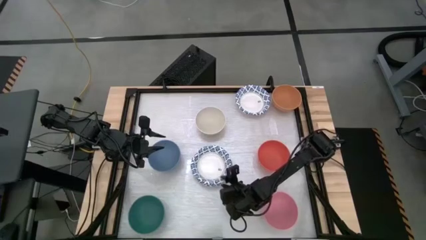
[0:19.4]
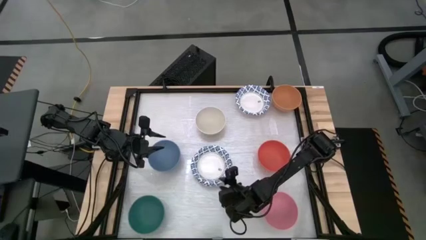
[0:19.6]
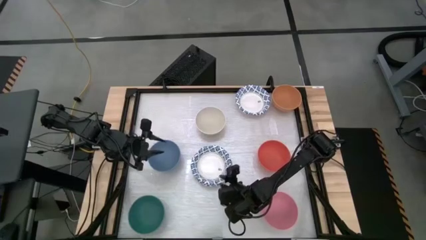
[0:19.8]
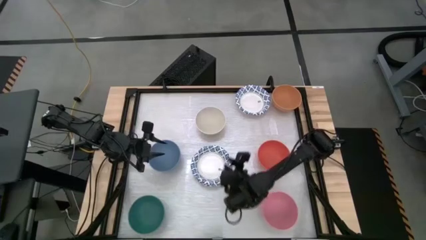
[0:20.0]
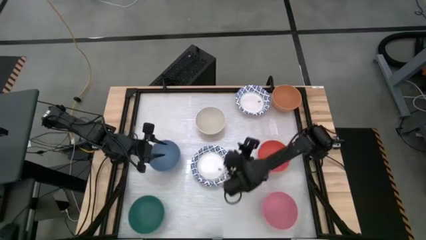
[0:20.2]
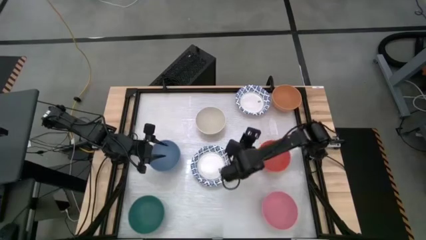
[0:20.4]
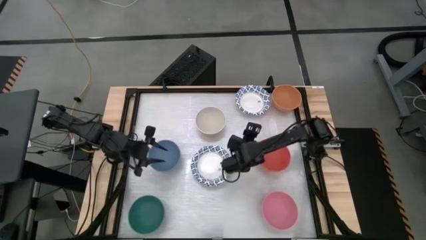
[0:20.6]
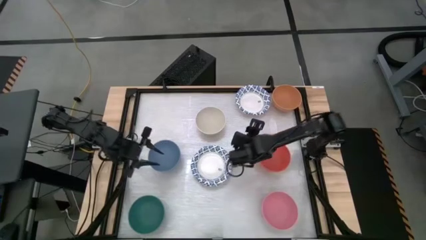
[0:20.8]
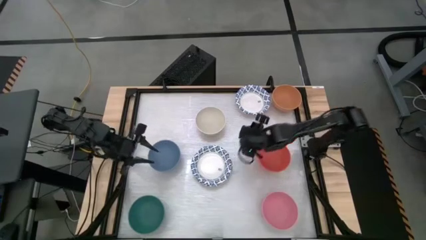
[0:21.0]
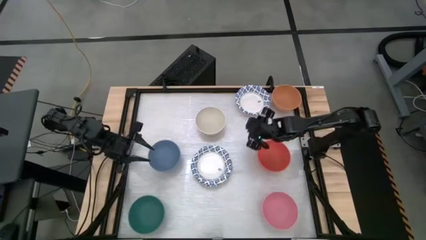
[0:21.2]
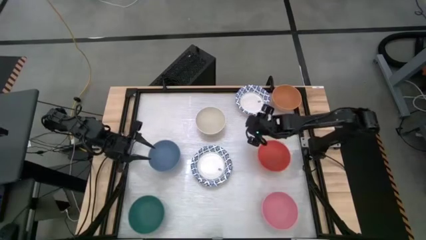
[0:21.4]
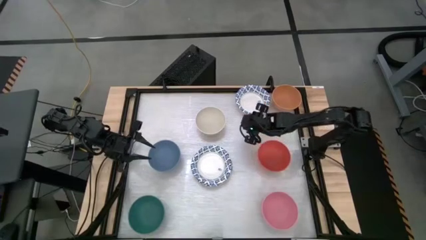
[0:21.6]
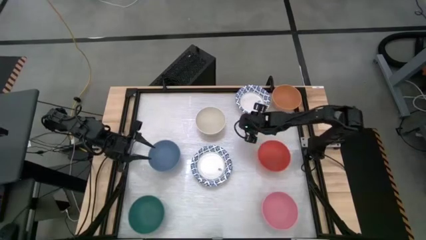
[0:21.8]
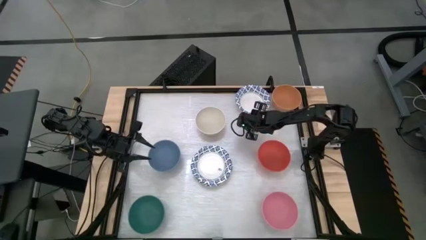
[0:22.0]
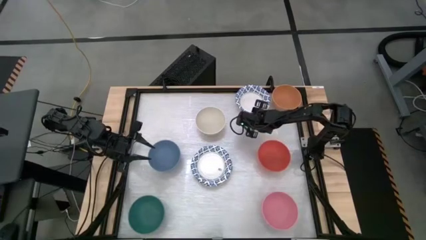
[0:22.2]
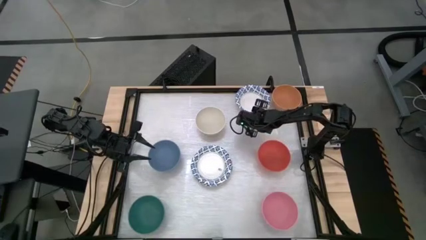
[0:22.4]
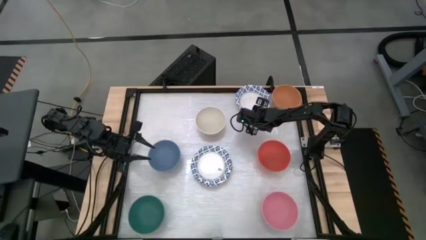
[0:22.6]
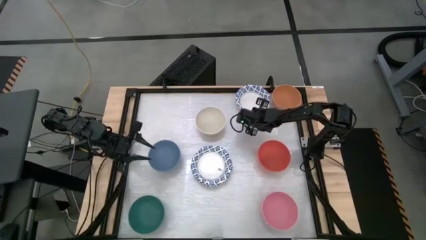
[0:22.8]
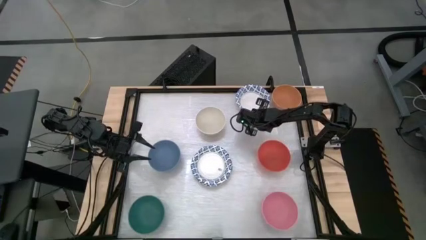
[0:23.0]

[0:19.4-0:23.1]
Task: Nest bowls inside each other by size order
Stack the top white blue bowl into the center white blue bowls

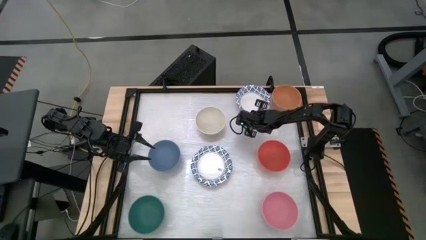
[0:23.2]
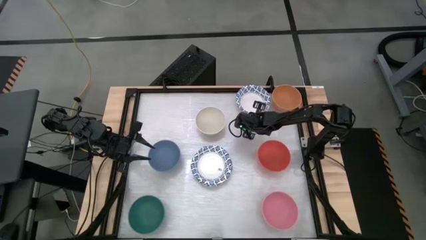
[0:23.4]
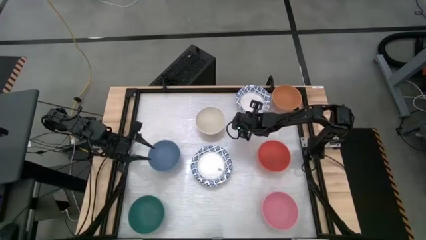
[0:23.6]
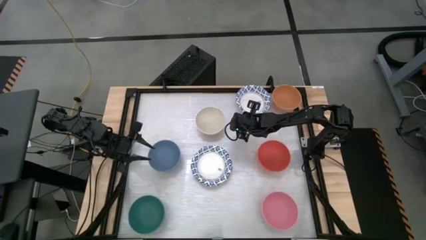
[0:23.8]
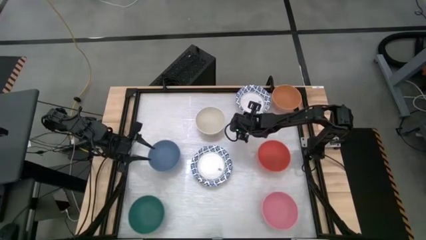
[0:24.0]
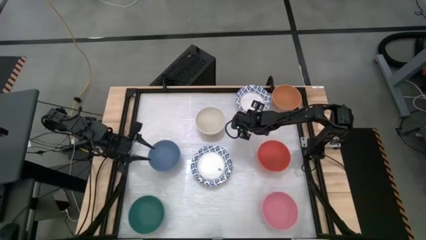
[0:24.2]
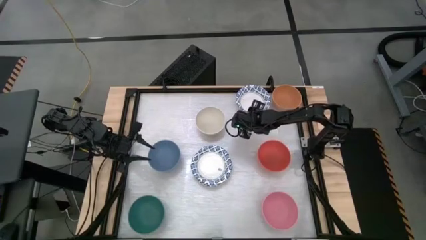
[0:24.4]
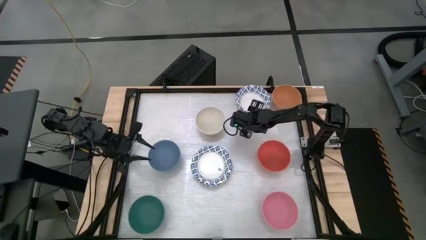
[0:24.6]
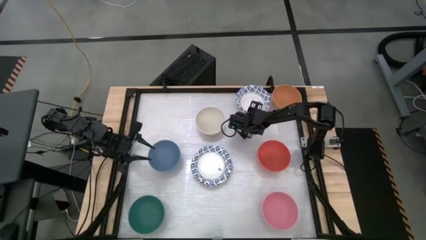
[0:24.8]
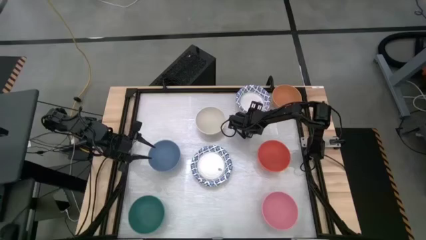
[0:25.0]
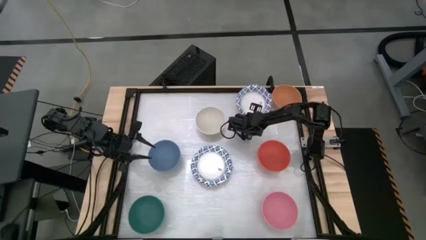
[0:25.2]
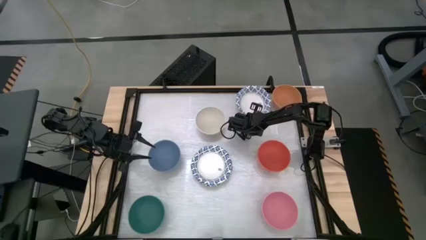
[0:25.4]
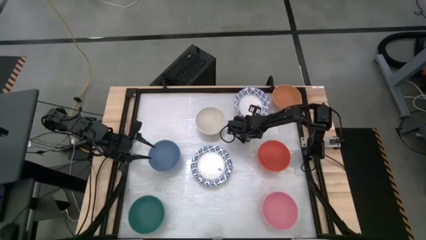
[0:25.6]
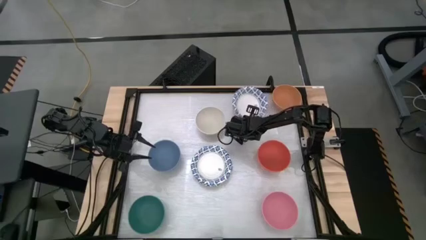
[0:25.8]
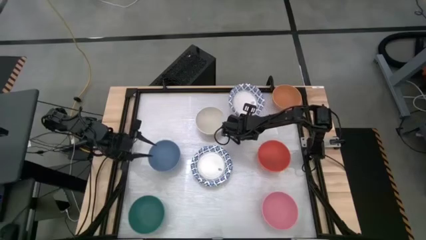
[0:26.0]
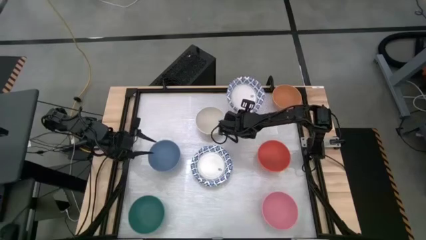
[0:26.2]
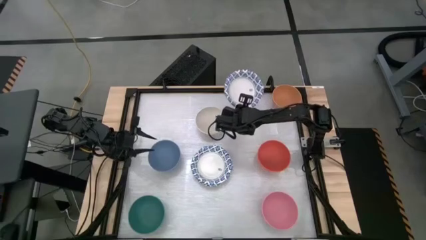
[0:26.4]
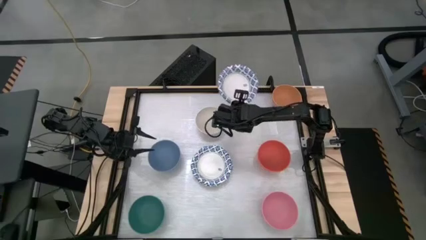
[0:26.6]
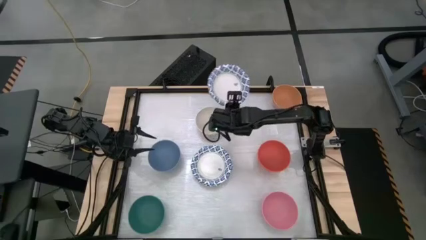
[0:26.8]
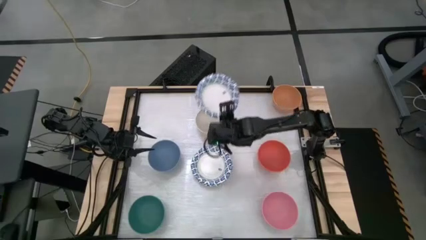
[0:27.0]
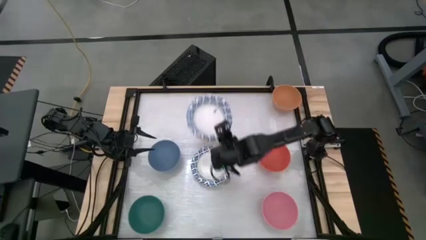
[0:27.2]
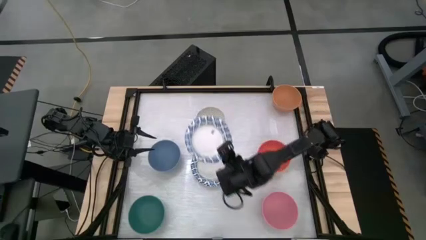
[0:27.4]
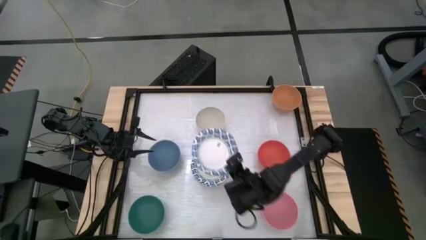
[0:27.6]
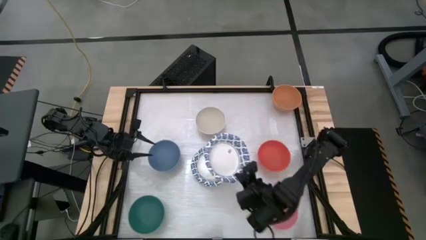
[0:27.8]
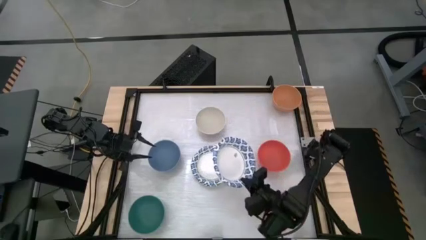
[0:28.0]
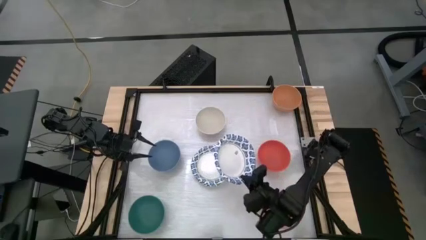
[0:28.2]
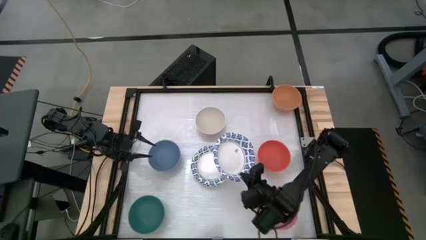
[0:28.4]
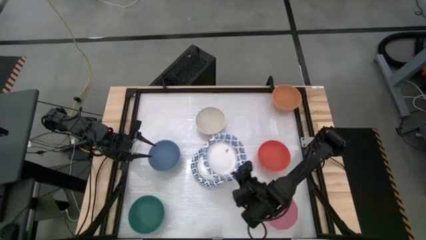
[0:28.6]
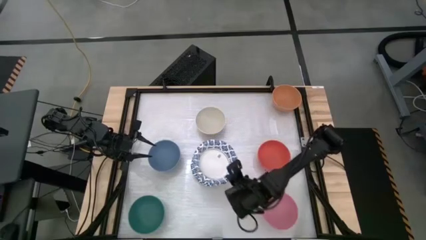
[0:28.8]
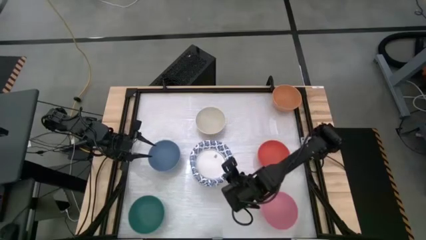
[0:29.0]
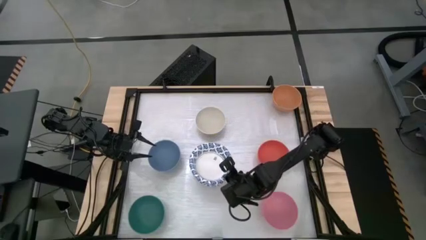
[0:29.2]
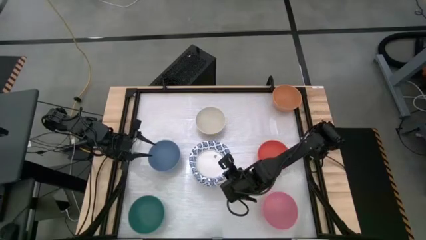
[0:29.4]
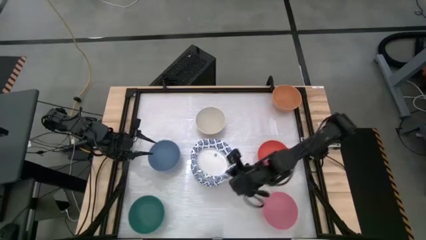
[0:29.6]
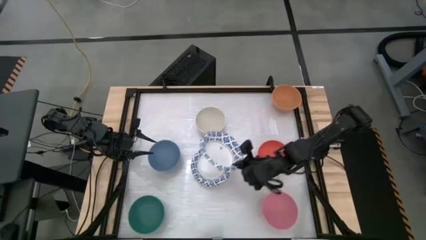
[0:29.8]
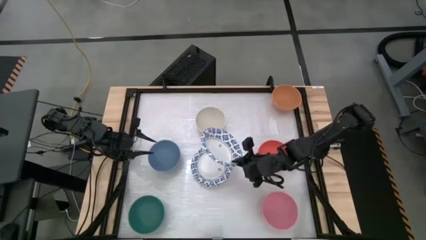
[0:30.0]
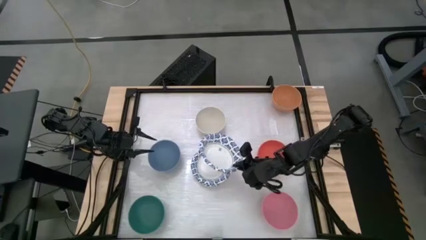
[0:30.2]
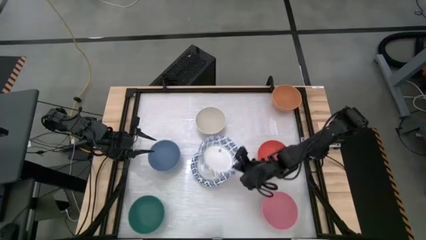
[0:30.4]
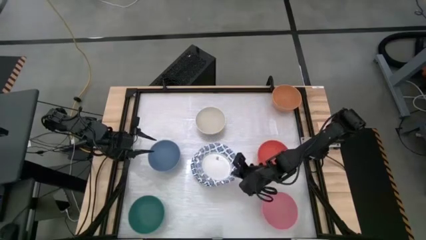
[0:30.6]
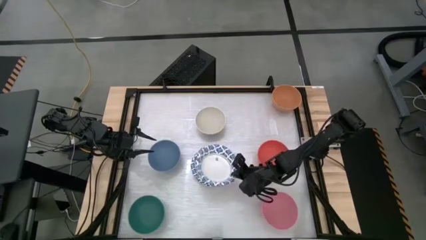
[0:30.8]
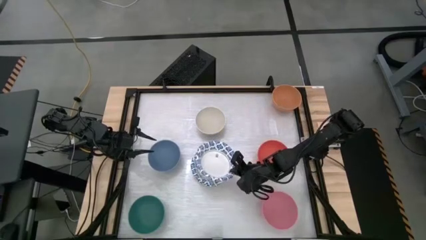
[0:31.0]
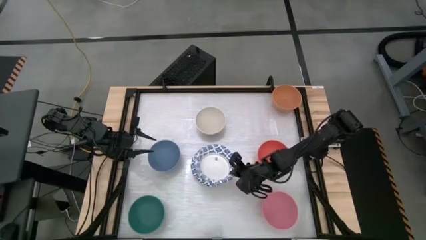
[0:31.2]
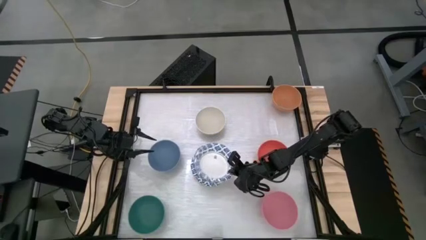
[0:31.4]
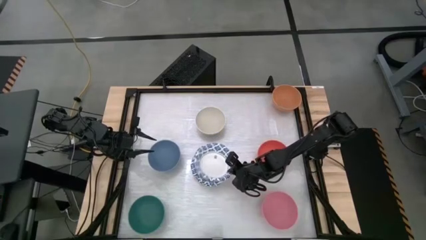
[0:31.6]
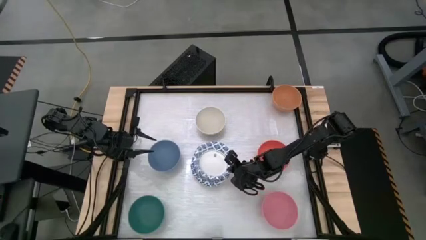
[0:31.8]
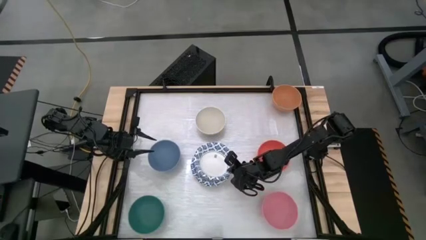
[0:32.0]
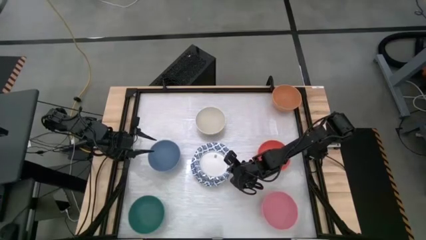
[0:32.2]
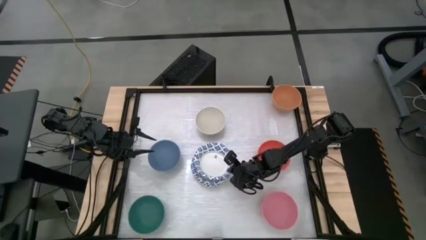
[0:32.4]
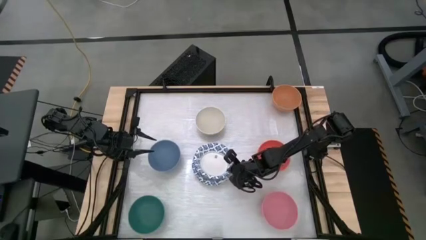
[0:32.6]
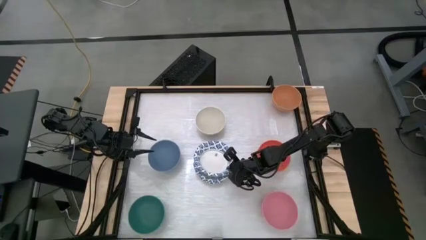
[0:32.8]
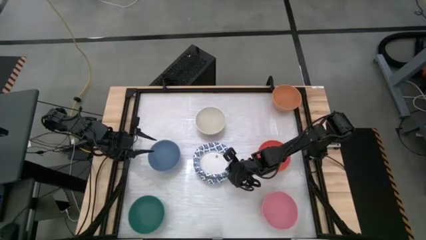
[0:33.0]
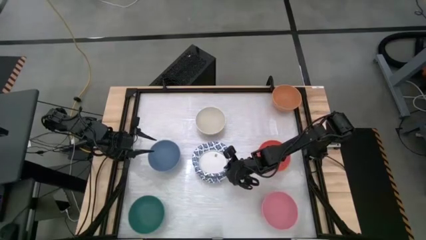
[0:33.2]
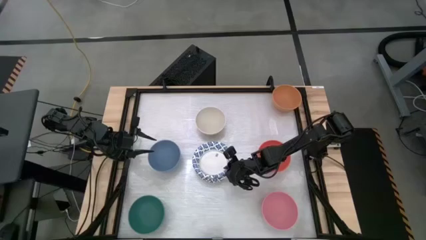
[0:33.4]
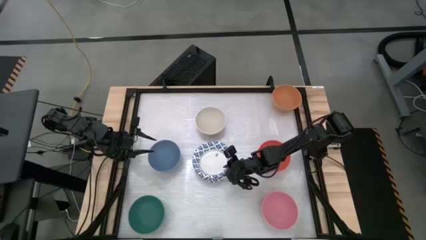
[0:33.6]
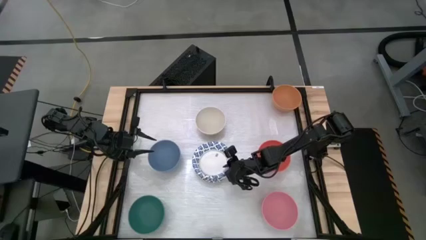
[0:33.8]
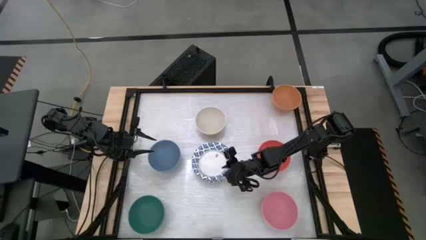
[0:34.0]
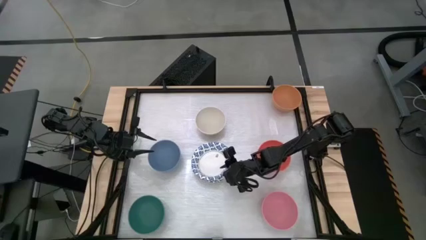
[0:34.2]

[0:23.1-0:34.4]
Stack the top white blue bowl into the center white blue bowls
